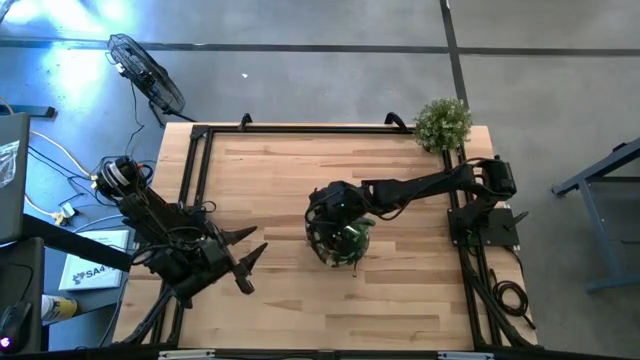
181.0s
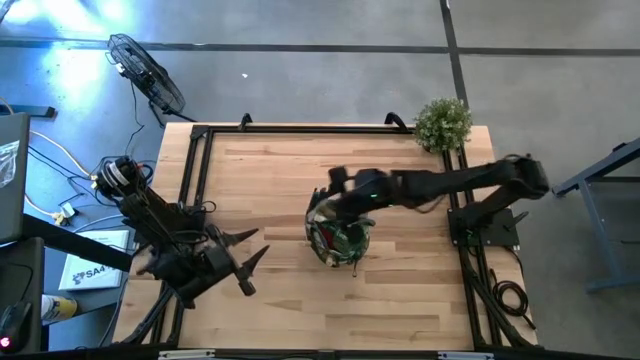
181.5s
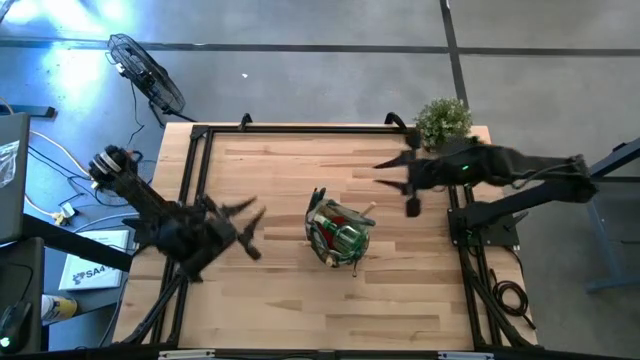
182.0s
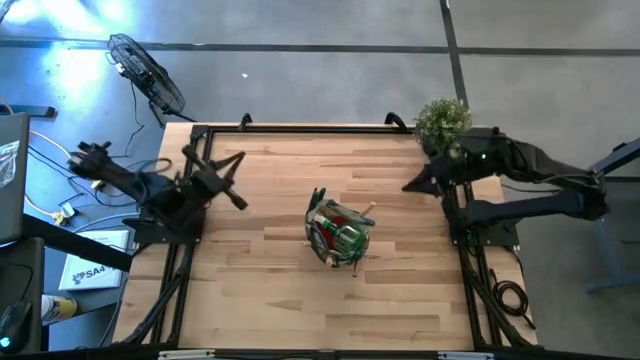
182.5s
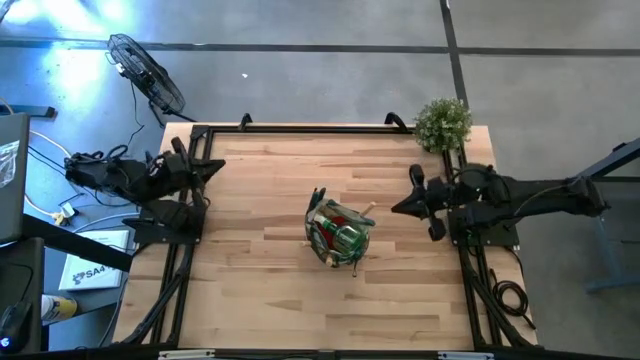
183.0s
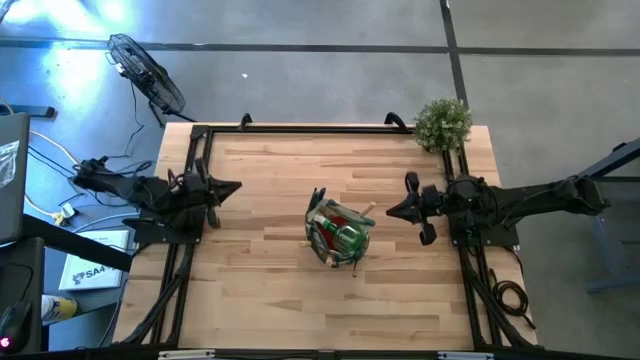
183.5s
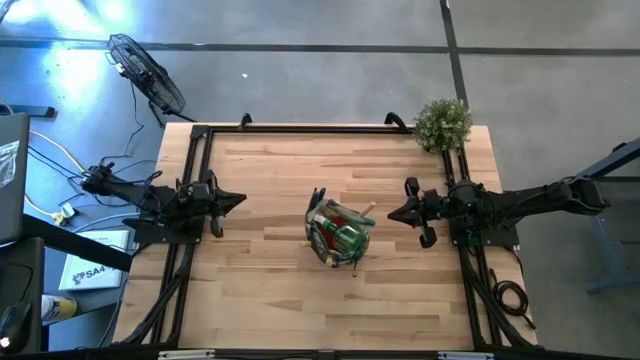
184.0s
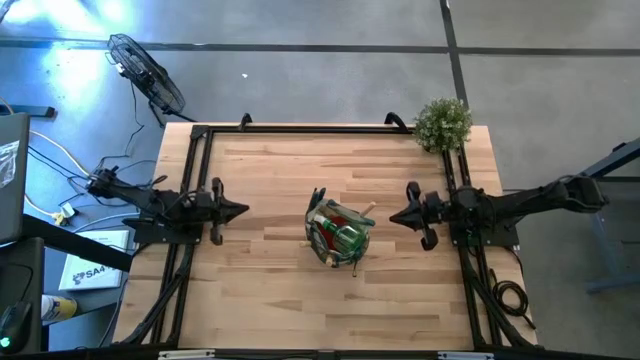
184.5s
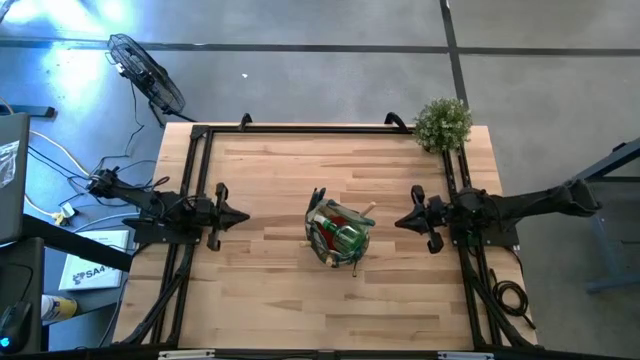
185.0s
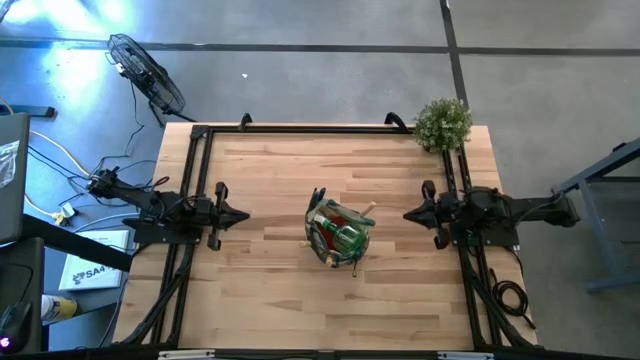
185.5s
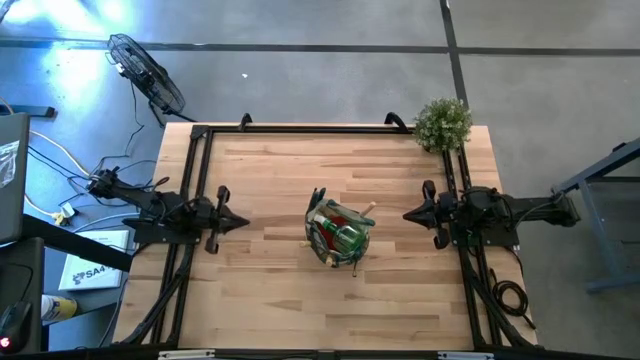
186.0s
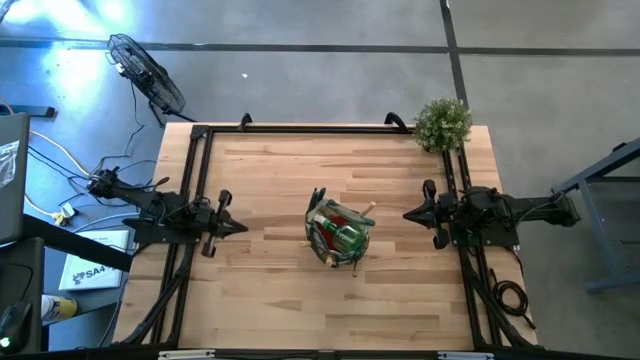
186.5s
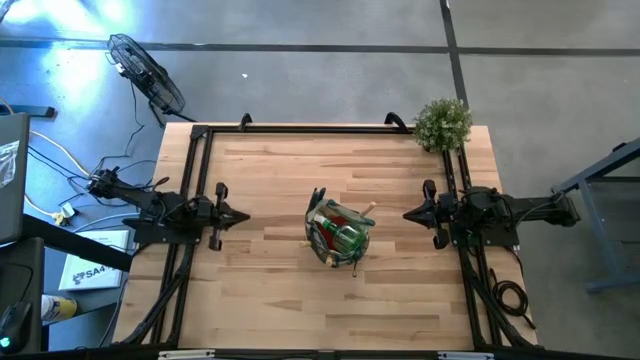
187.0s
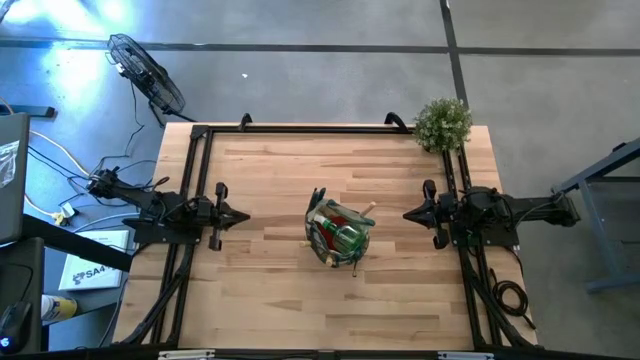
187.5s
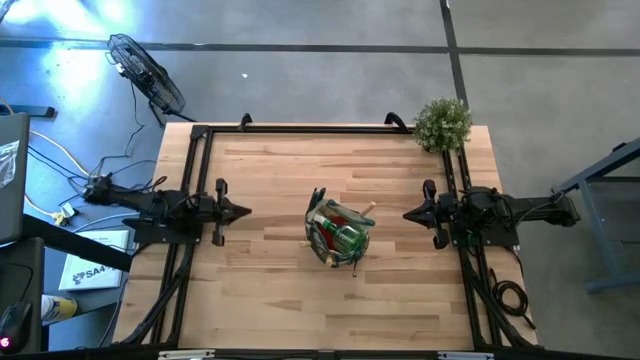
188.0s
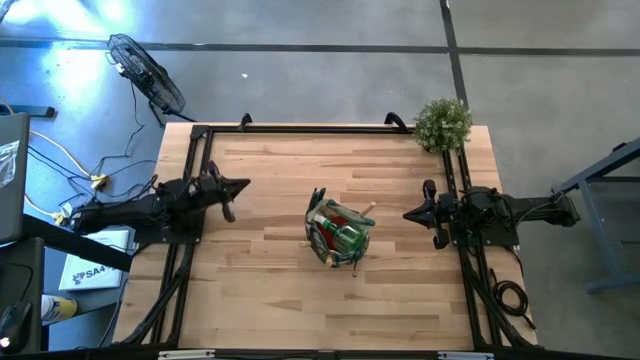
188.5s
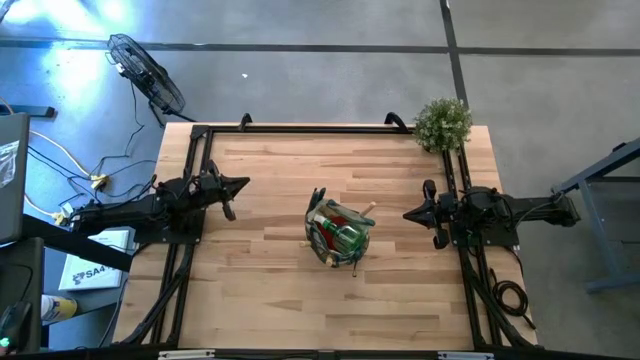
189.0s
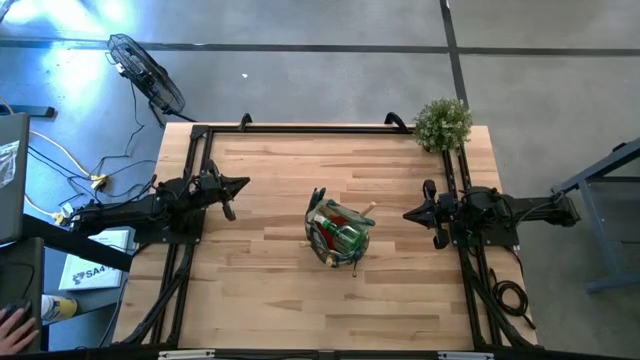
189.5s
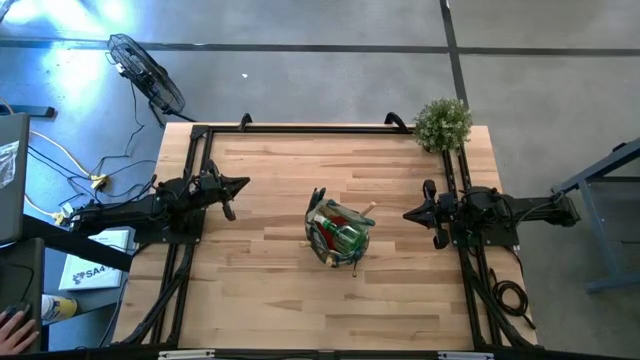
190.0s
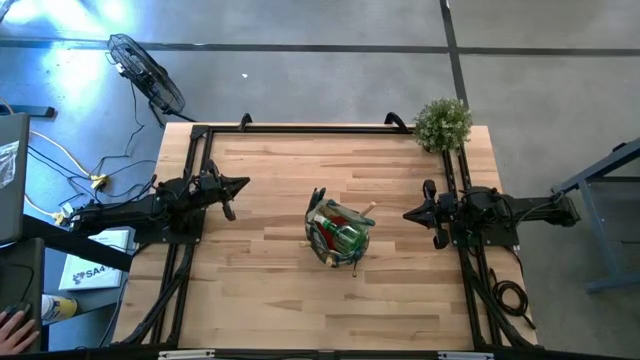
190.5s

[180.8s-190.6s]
Task: Pick & Place Garden tools in Gardening bag
Return to Home Position

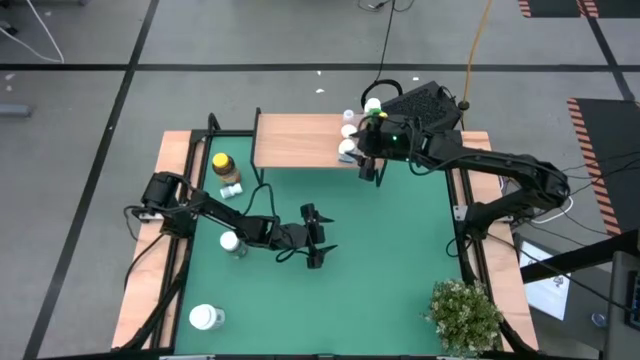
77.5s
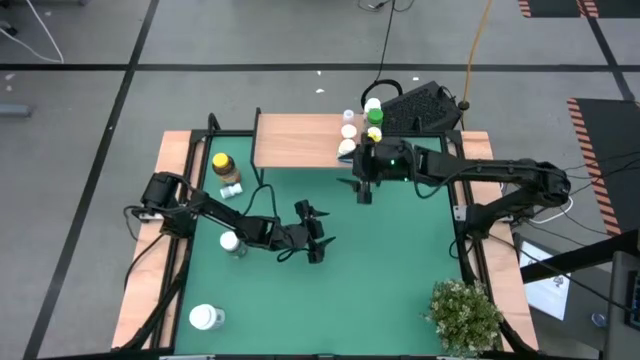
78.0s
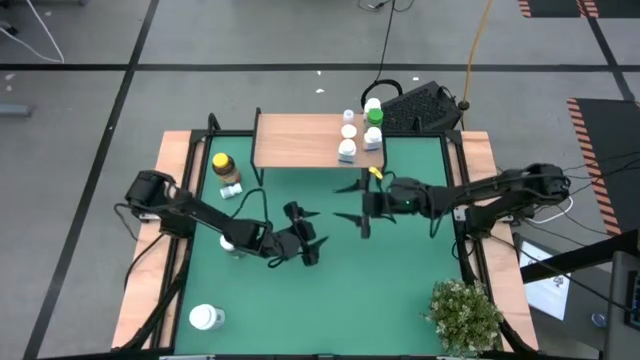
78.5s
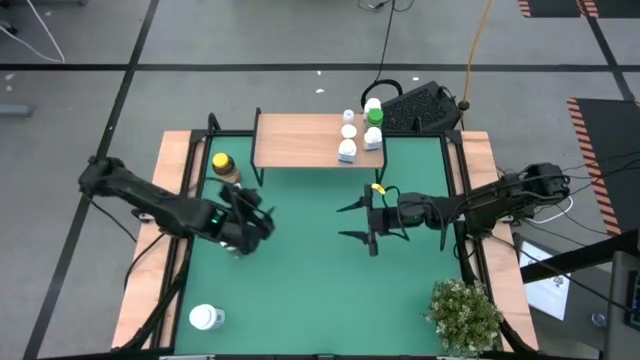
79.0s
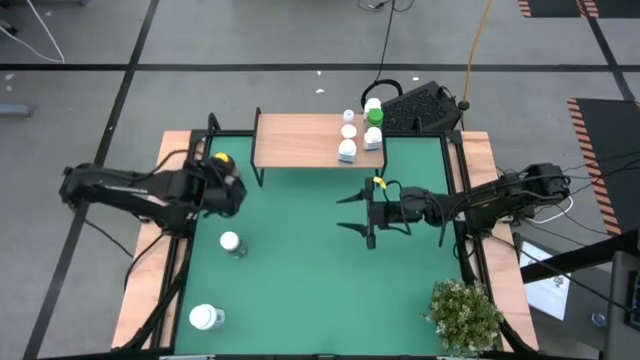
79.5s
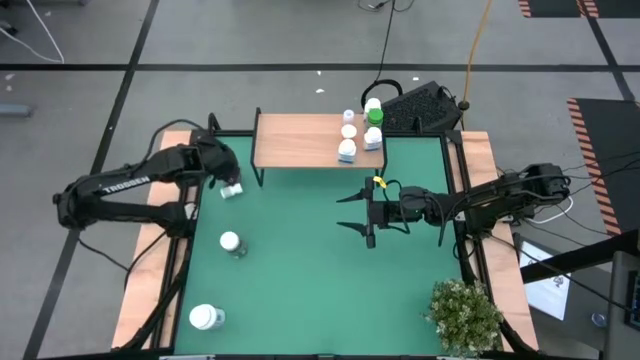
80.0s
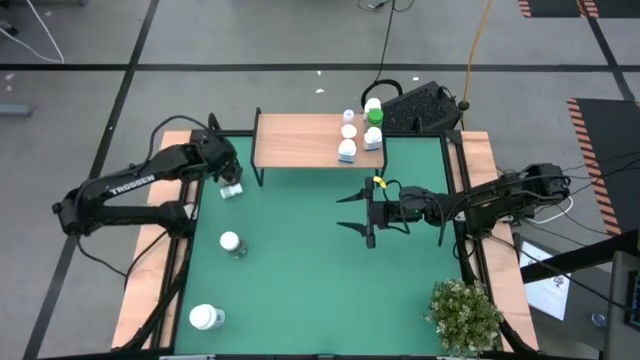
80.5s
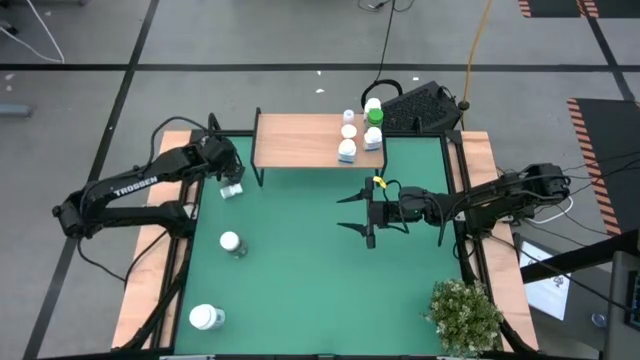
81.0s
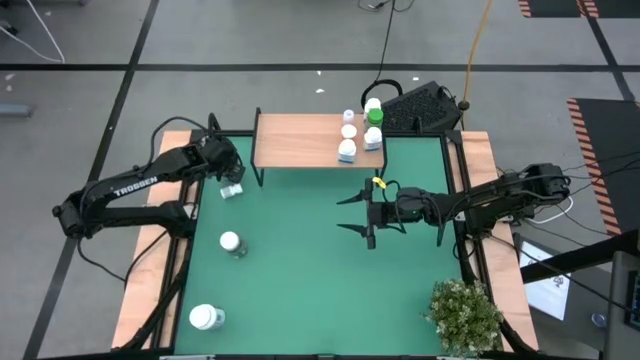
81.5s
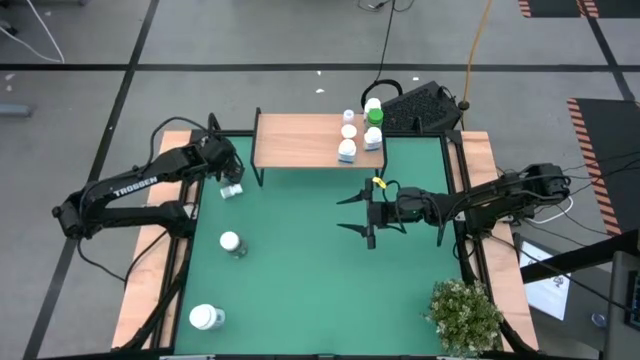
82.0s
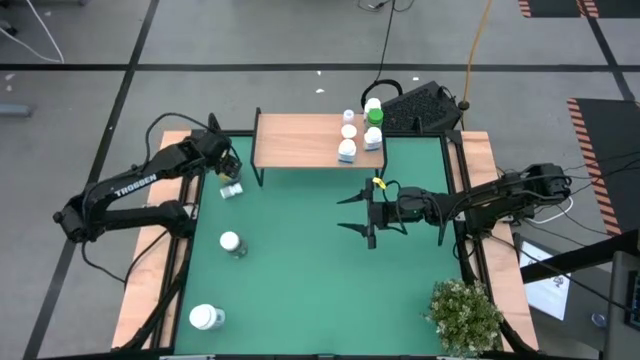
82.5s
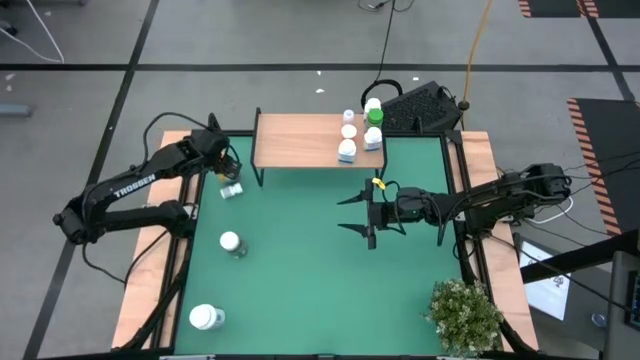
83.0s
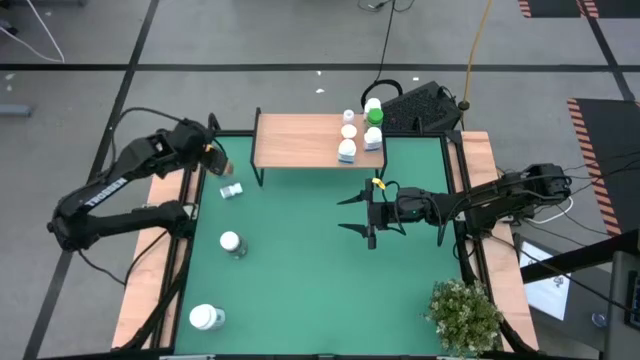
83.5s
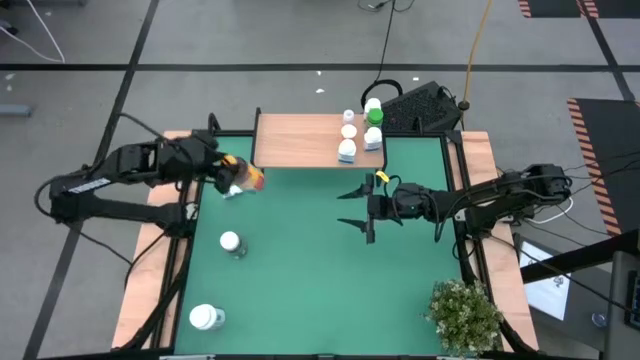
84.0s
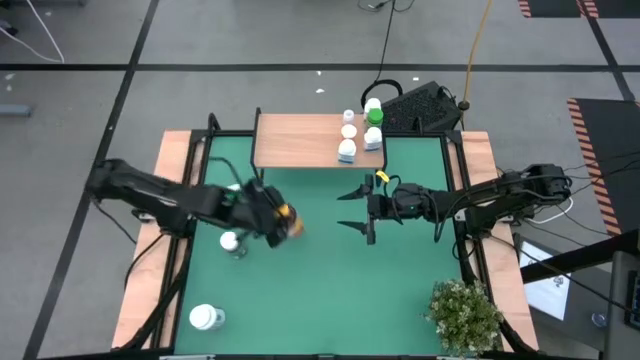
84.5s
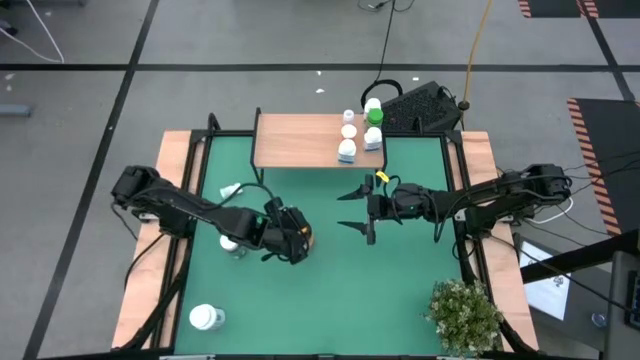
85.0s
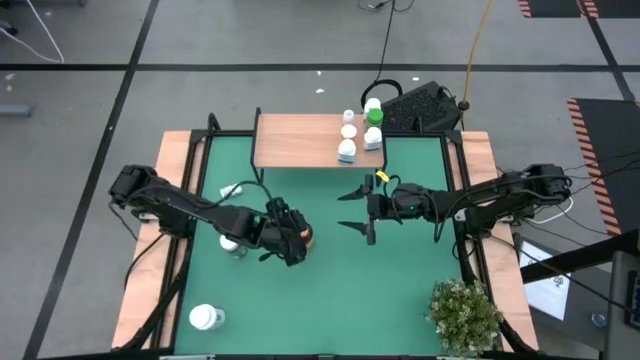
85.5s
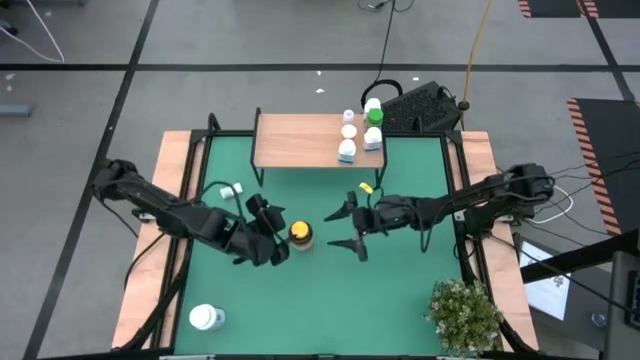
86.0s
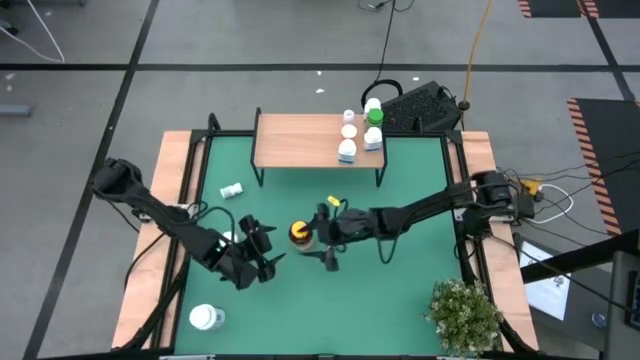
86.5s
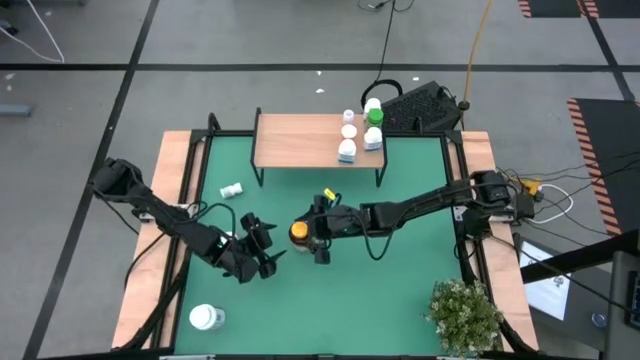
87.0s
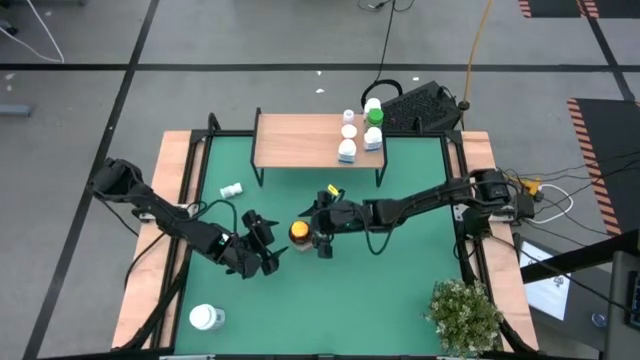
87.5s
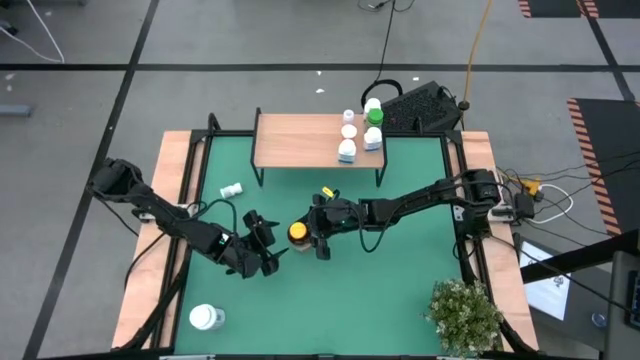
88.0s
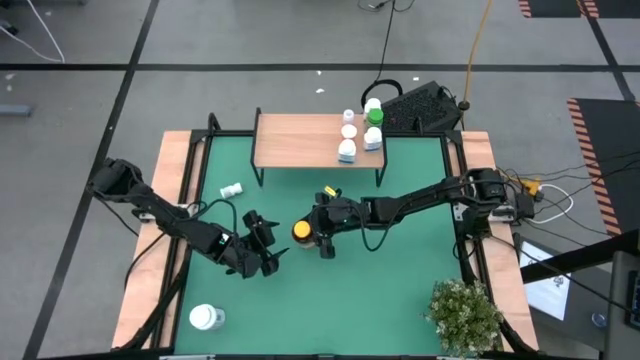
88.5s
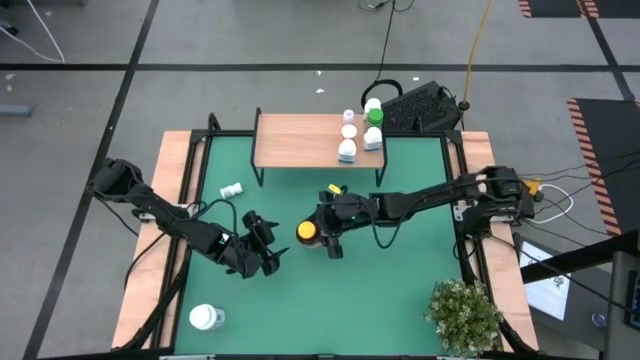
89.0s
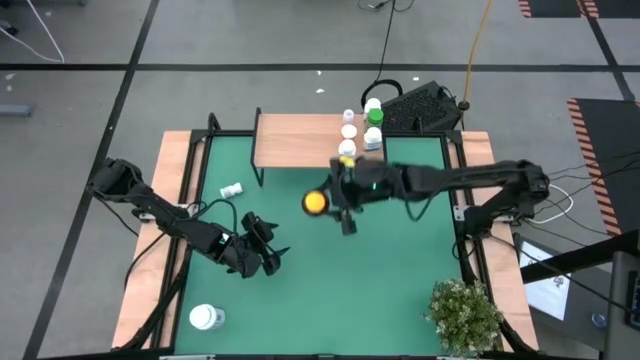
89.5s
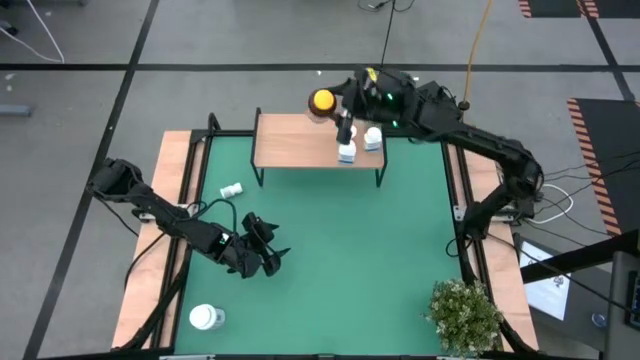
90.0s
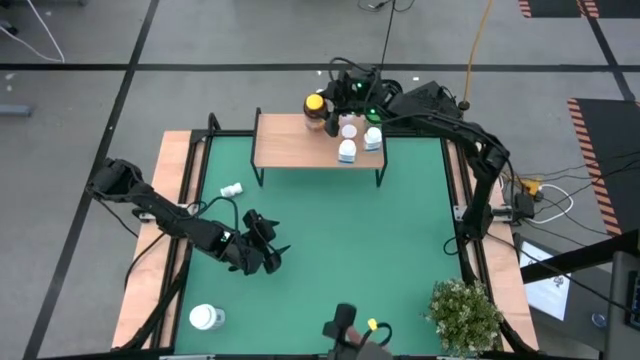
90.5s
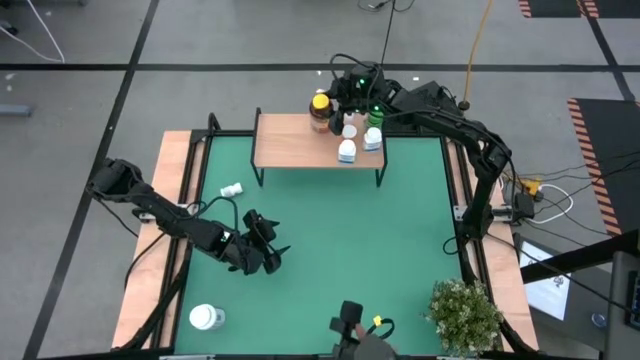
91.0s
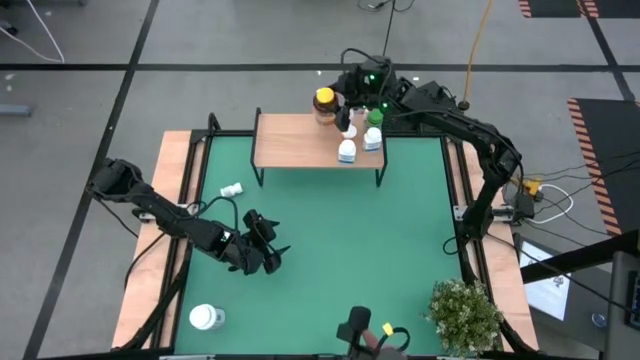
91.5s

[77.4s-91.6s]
Task: Pick and place medicine bottles onto shelf by color
Put the yellow medicine bottle on the shelf
